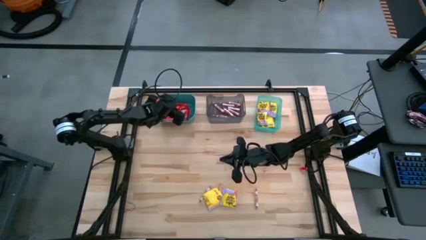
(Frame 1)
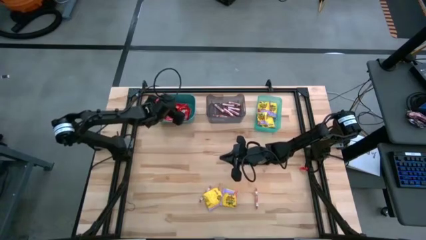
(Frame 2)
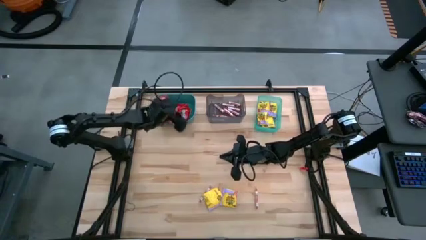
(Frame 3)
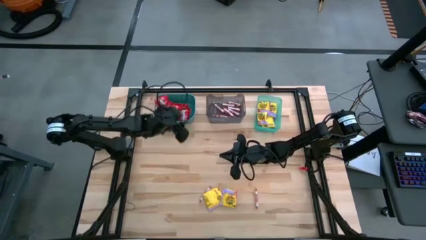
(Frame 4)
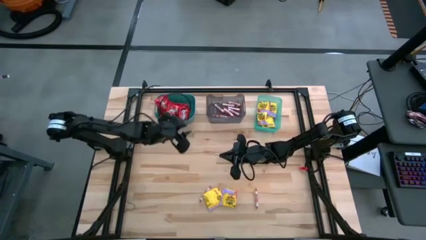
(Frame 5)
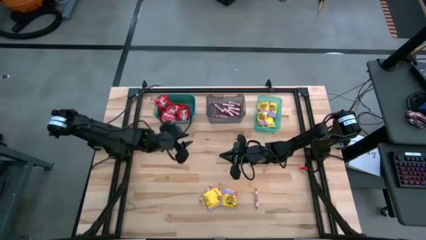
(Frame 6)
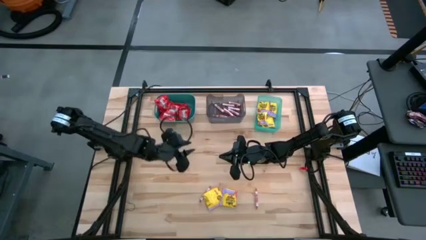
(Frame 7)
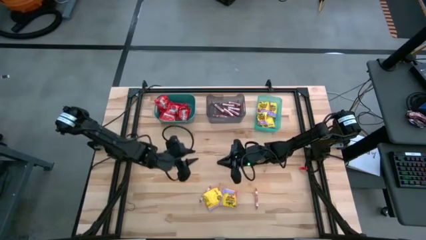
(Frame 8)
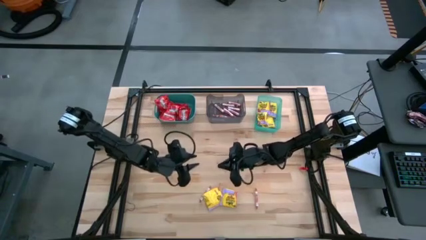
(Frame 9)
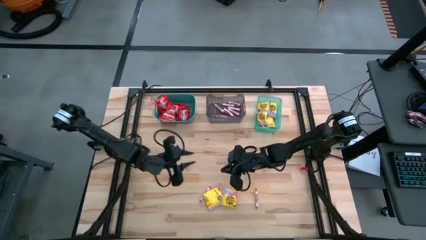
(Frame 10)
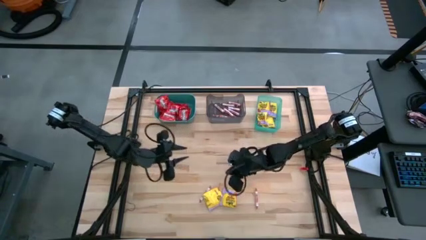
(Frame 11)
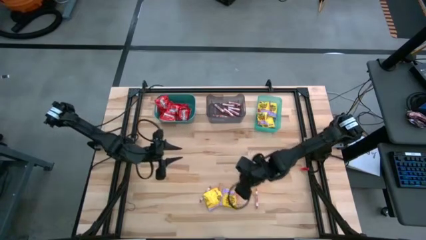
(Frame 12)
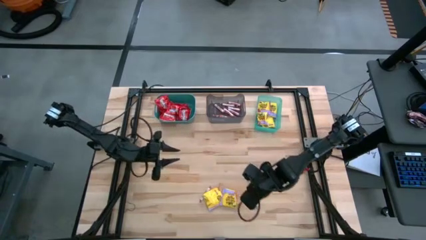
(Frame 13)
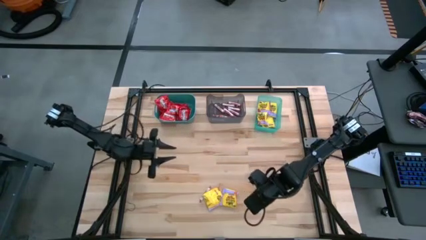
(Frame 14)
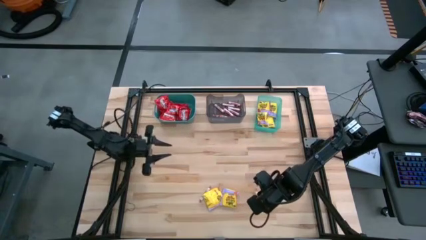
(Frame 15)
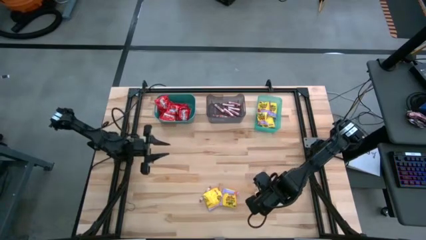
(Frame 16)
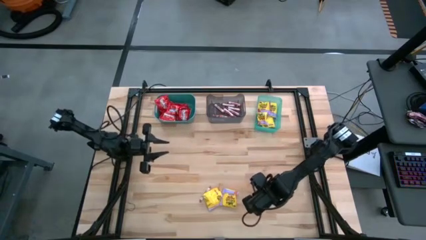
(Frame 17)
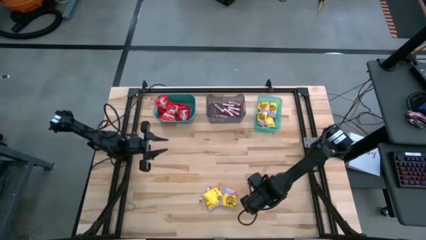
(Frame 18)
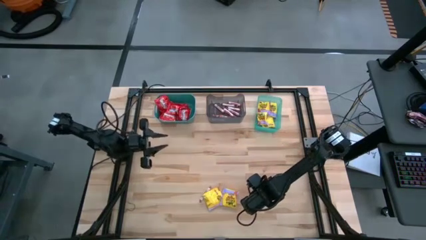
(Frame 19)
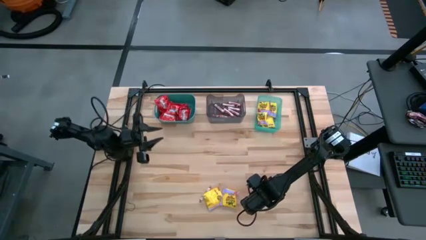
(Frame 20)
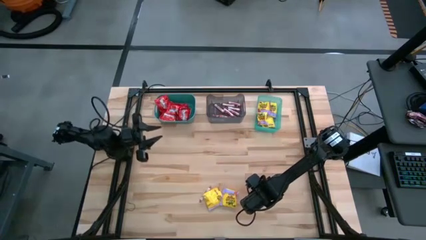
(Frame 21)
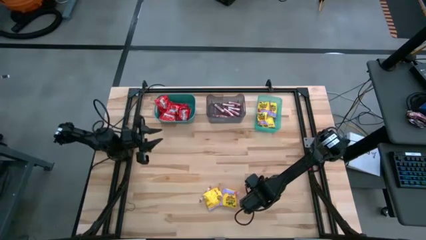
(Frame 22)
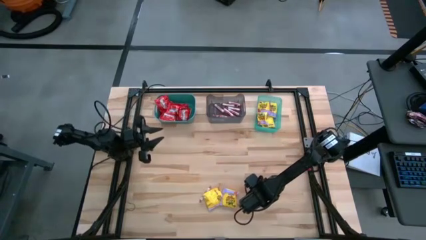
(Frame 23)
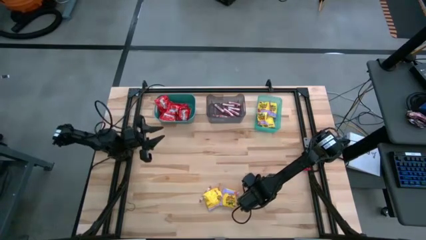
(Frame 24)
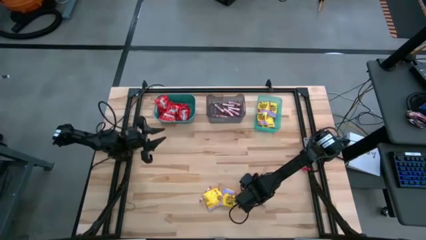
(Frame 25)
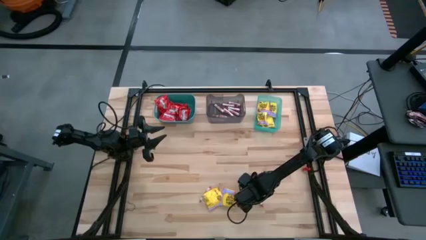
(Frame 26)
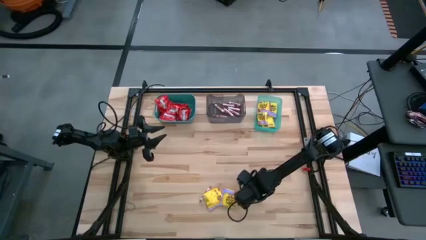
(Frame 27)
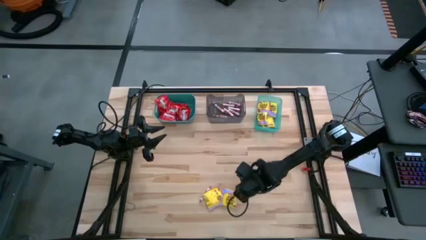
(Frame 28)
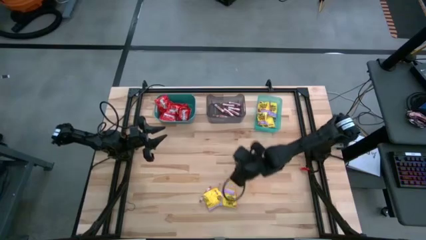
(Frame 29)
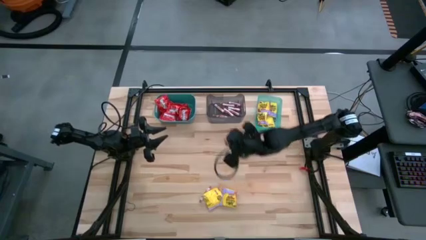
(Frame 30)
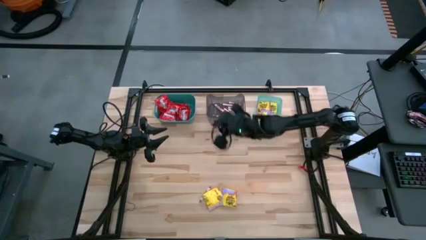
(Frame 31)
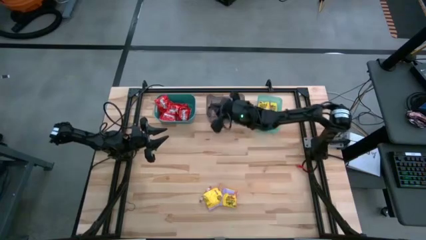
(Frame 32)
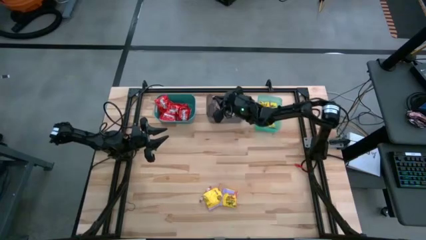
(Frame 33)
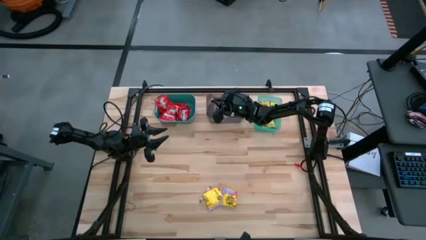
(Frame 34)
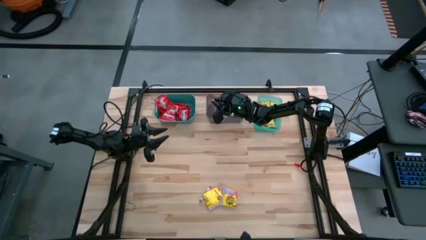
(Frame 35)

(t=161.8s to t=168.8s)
Task: Sort candy
Put the white candy into the black bin

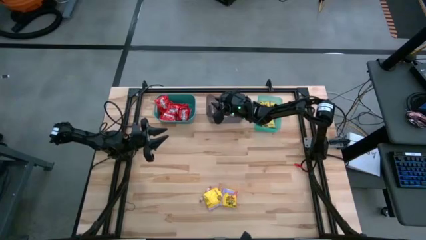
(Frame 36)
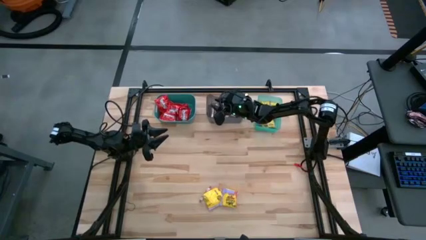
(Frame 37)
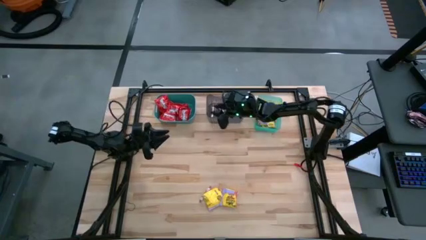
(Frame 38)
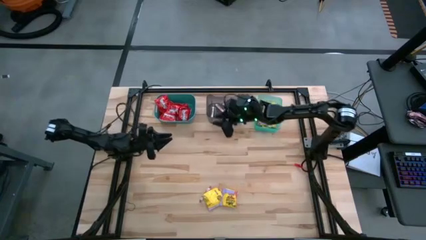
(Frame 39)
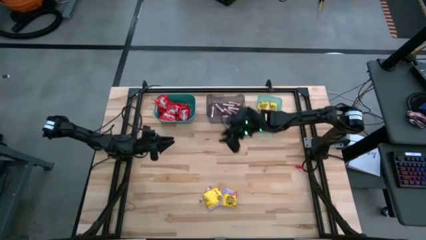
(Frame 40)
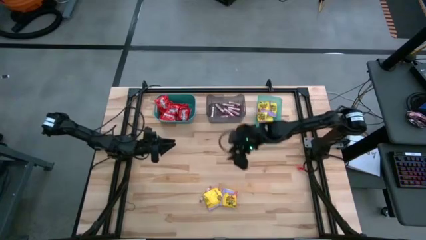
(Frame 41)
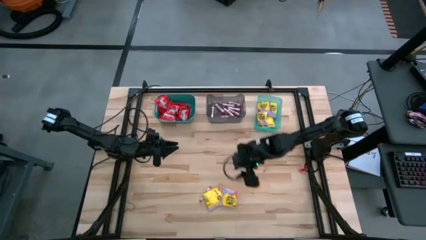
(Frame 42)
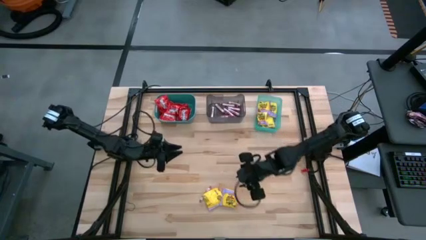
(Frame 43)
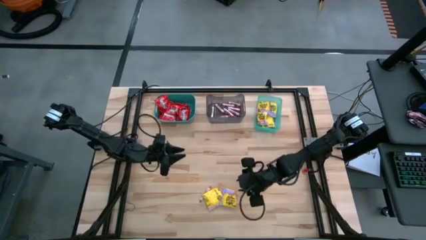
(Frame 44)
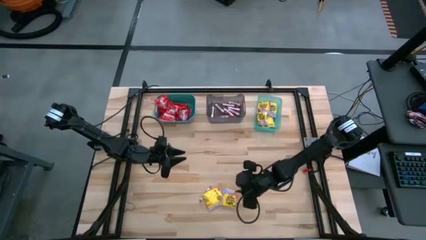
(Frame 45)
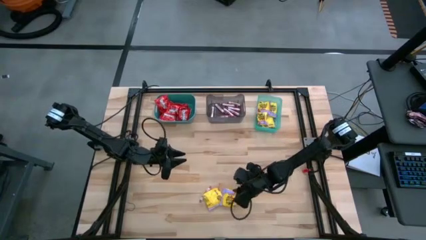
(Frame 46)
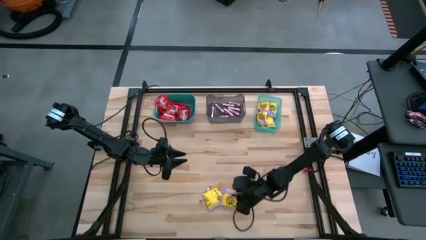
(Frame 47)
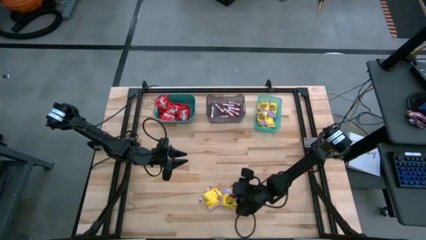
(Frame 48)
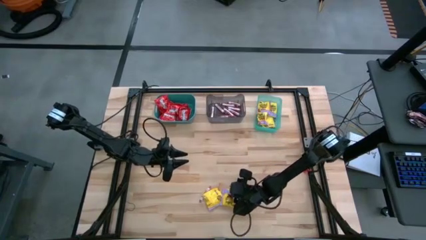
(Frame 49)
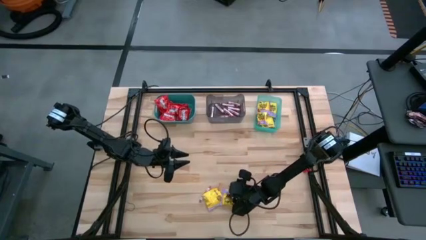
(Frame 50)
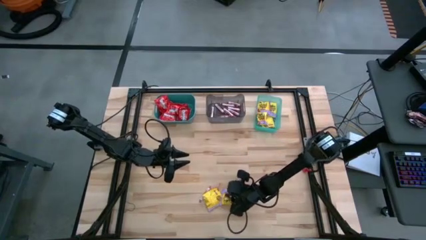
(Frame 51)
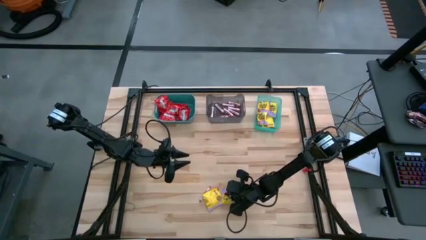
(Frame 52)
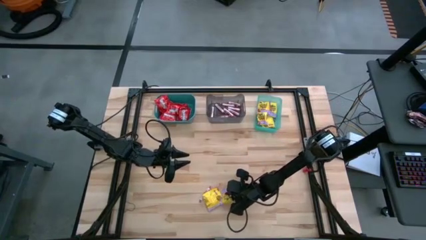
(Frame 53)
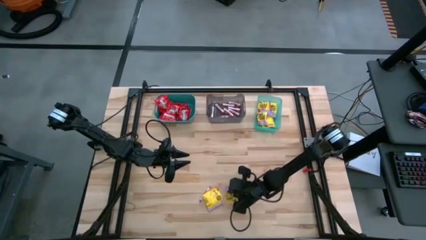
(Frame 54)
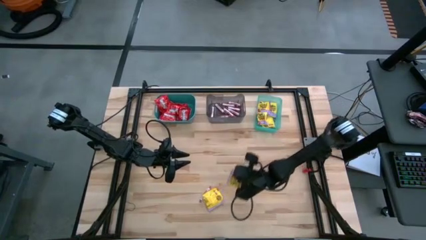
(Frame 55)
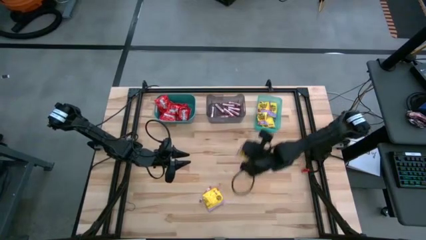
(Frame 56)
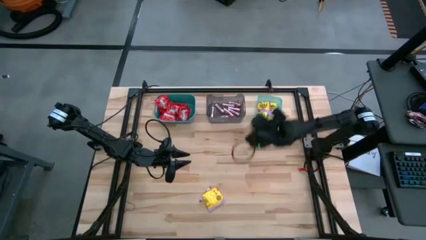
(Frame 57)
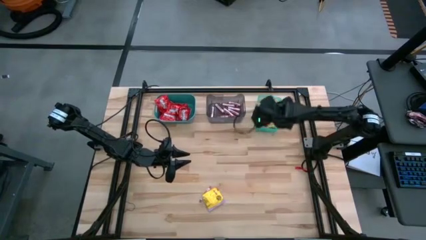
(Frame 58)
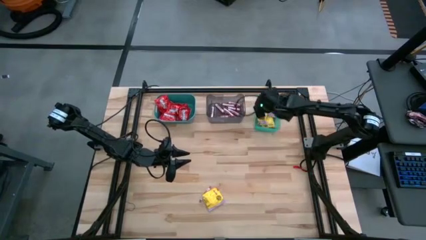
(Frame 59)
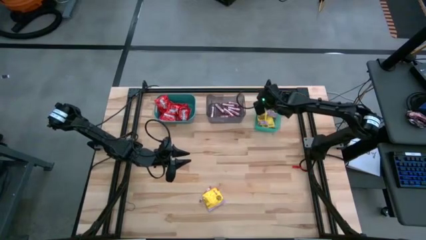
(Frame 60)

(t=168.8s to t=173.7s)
Put the yellow candy into the light green bin

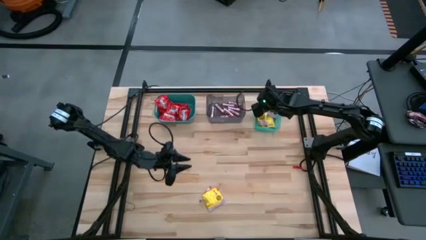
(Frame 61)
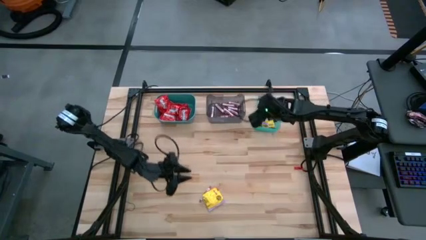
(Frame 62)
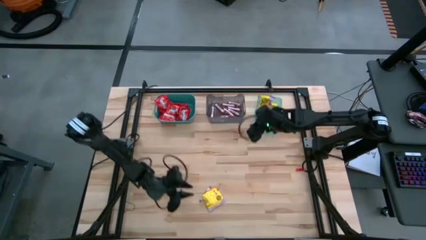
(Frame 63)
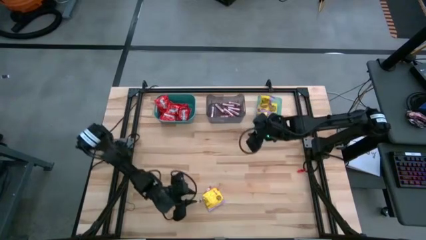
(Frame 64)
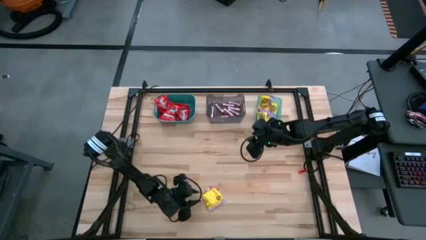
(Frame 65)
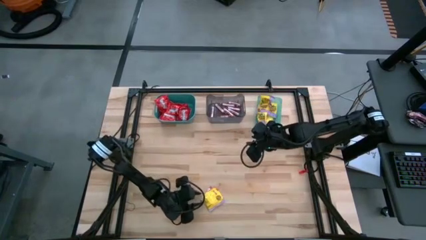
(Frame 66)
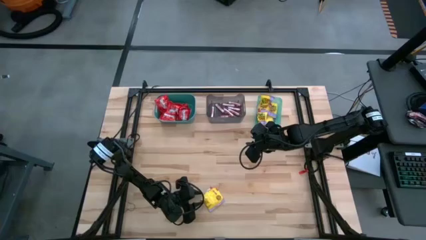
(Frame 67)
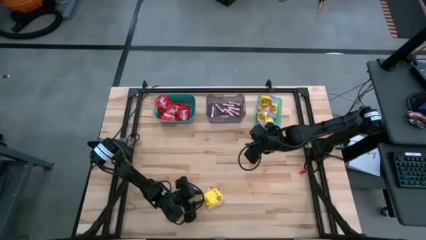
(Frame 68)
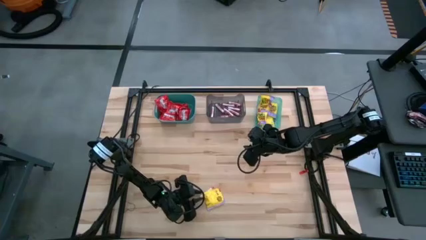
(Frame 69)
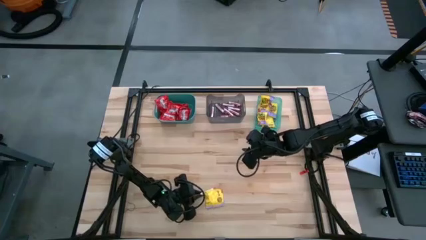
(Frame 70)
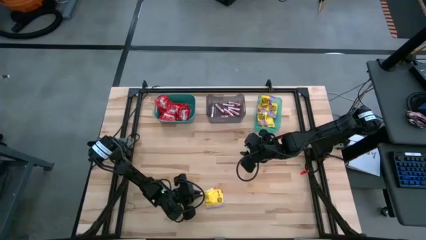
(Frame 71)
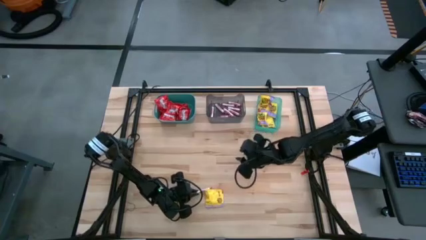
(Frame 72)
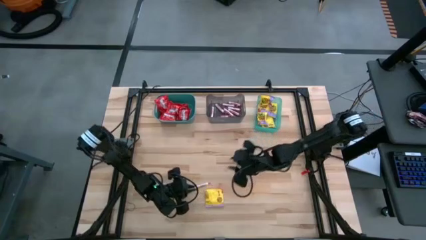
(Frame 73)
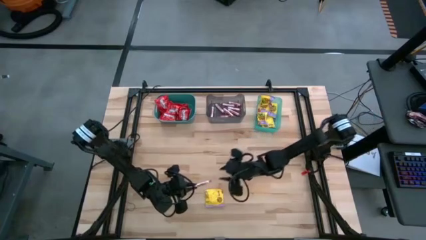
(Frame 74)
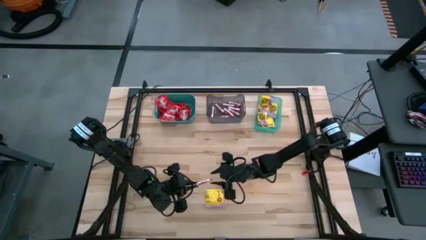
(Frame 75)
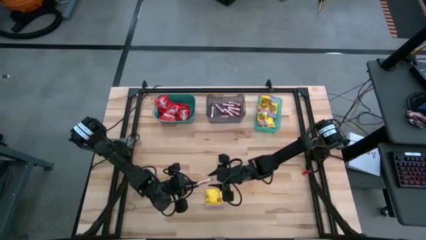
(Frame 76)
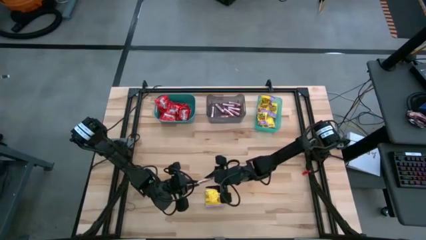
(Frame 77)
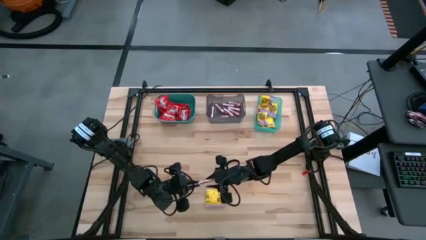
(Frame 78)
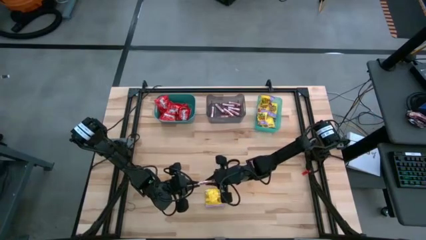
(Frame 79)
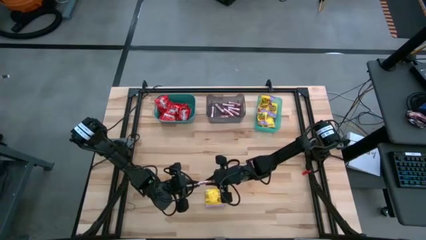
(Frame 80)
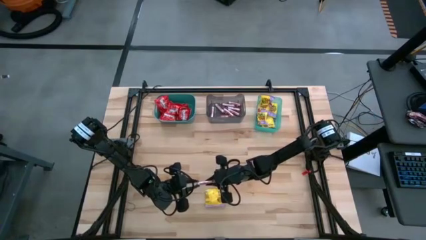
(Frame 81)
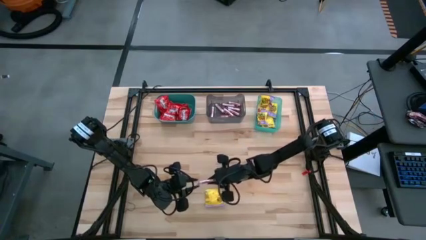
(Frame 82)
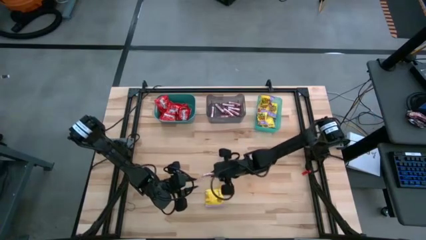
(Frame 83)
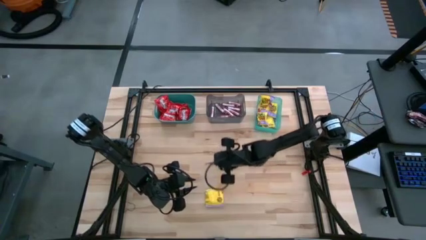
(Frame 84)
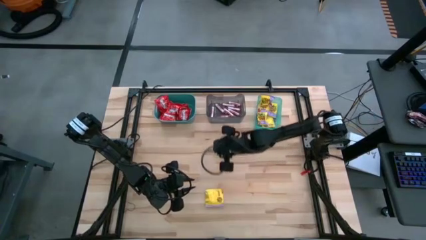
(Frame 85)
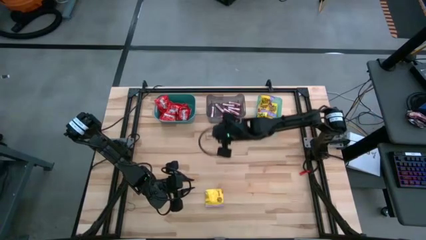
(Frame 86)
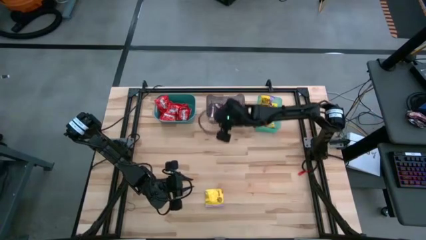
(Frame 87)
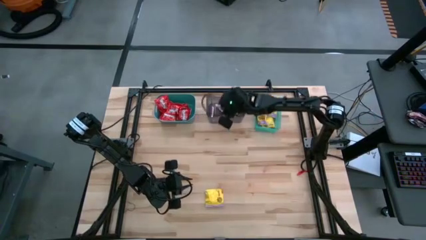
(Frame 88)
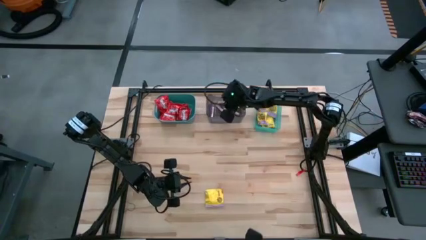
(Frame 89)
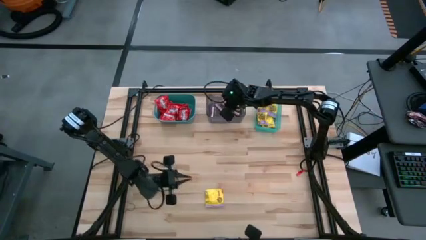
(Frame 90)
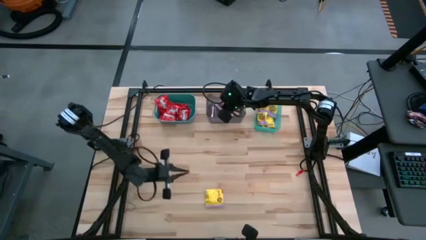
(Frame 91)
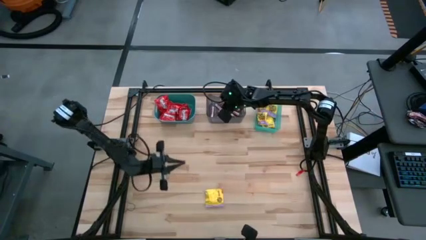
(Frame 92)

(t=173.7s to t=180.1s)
Put the white candy into the black bin
